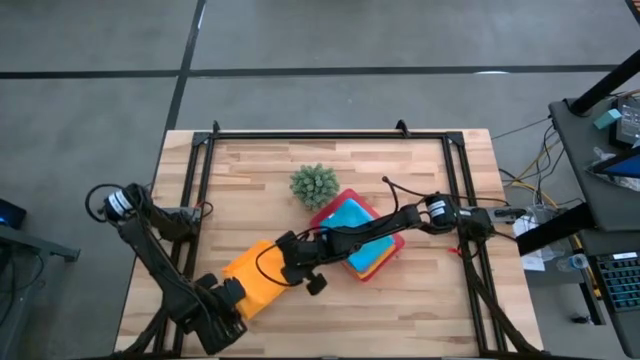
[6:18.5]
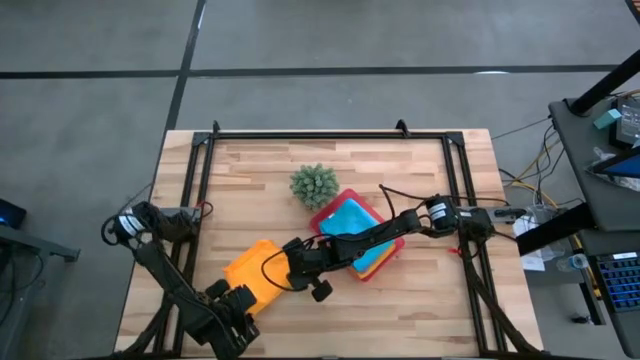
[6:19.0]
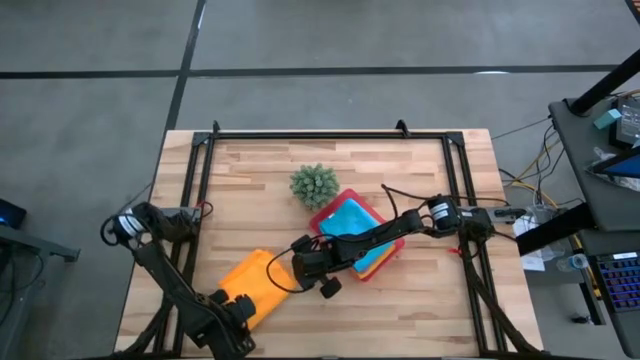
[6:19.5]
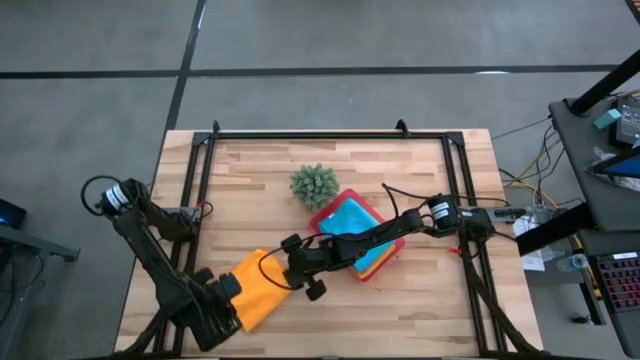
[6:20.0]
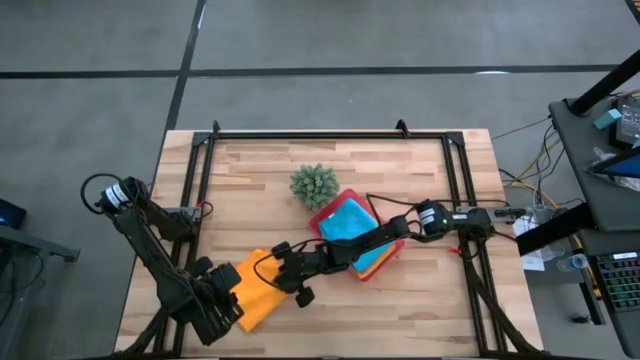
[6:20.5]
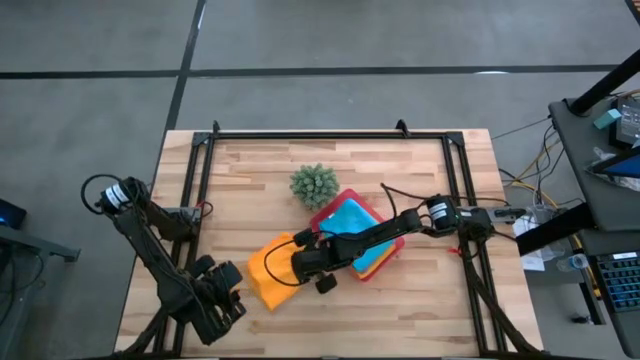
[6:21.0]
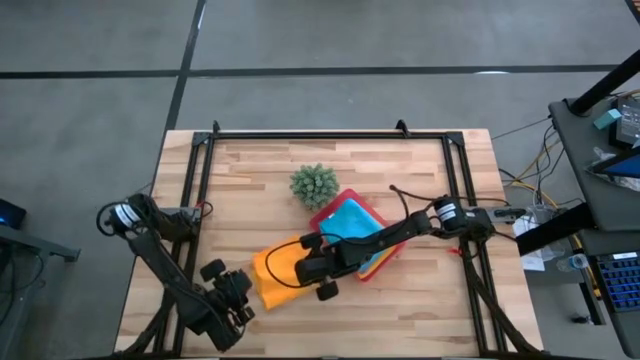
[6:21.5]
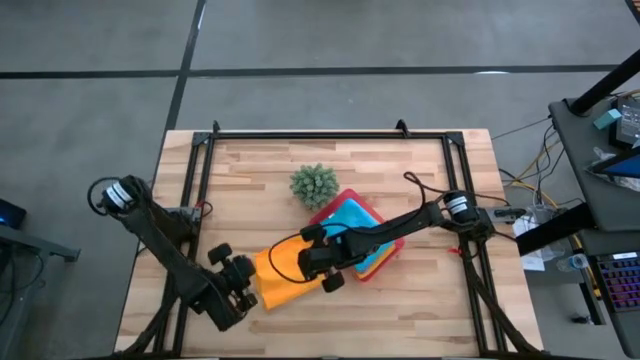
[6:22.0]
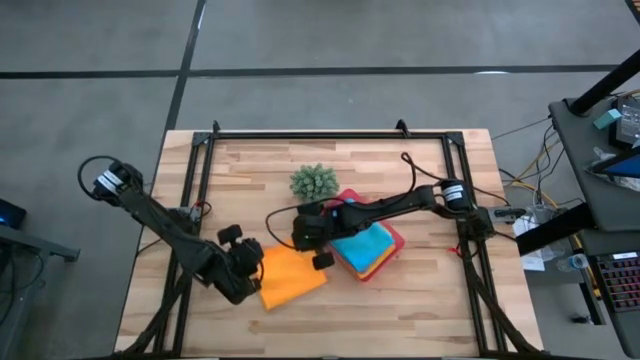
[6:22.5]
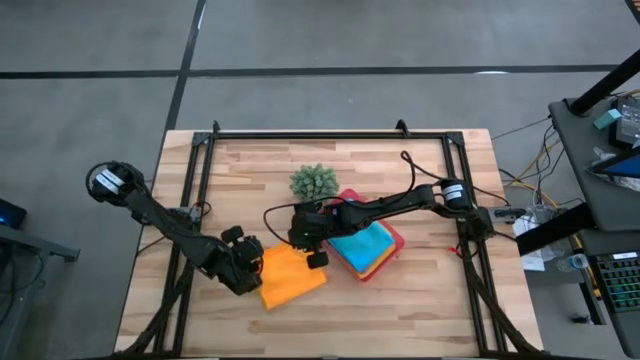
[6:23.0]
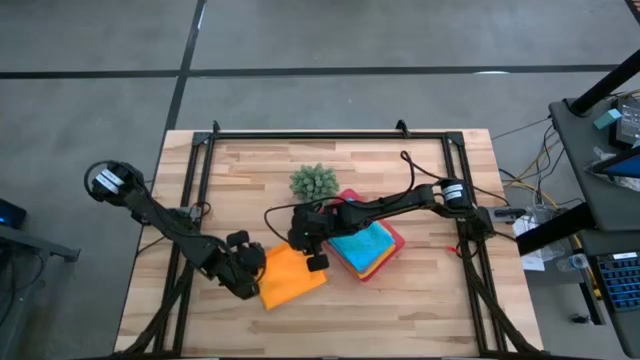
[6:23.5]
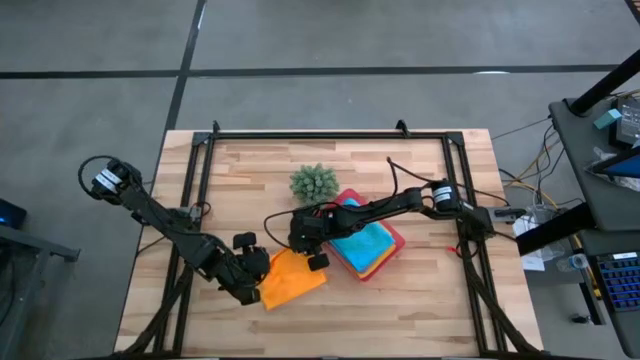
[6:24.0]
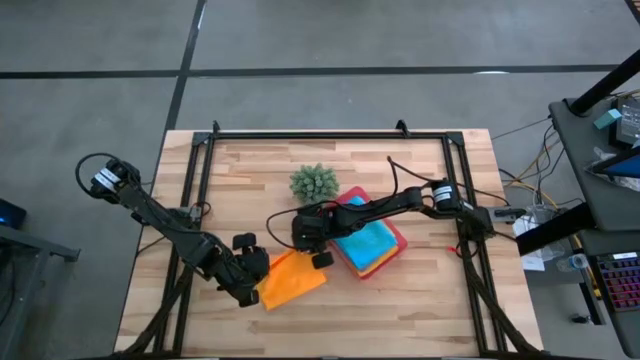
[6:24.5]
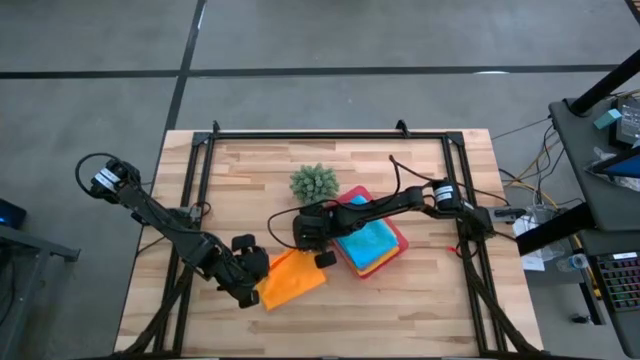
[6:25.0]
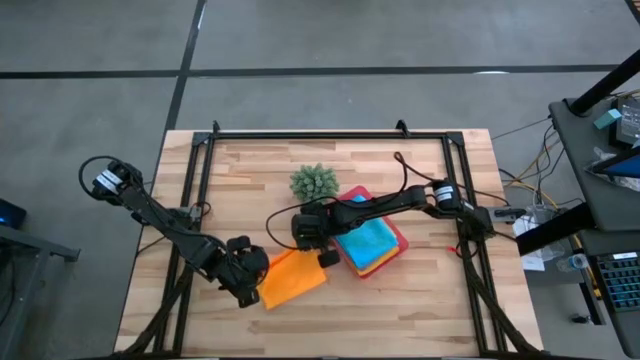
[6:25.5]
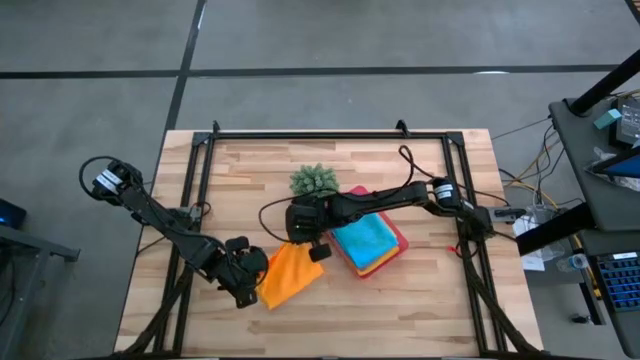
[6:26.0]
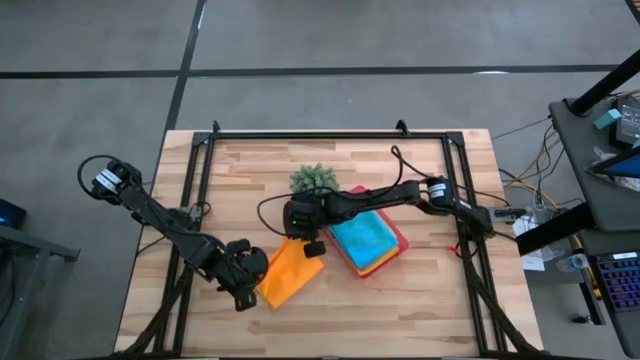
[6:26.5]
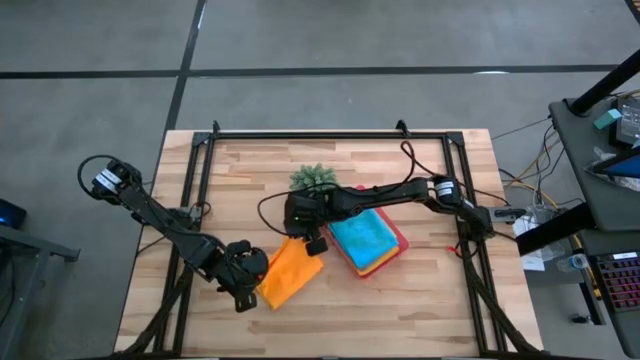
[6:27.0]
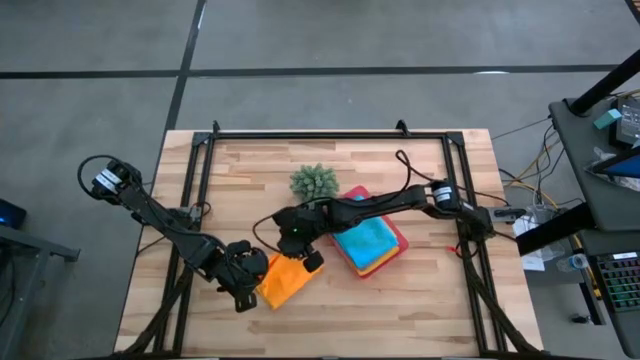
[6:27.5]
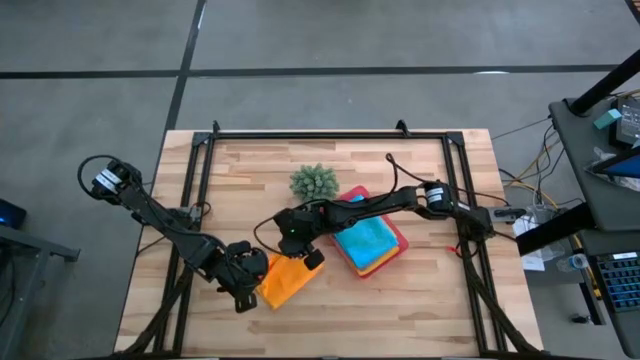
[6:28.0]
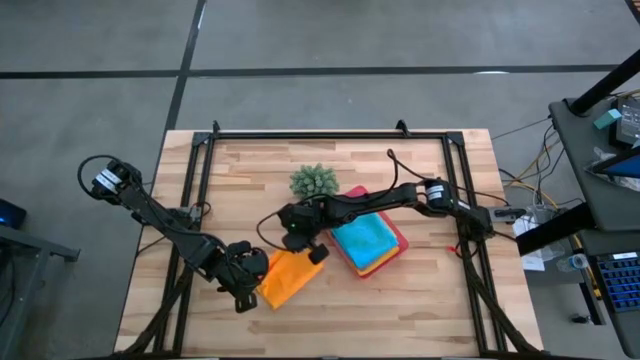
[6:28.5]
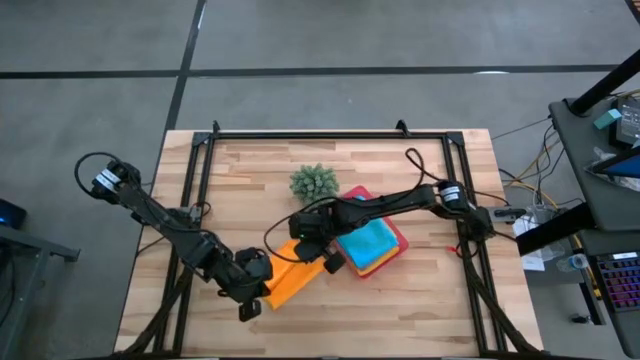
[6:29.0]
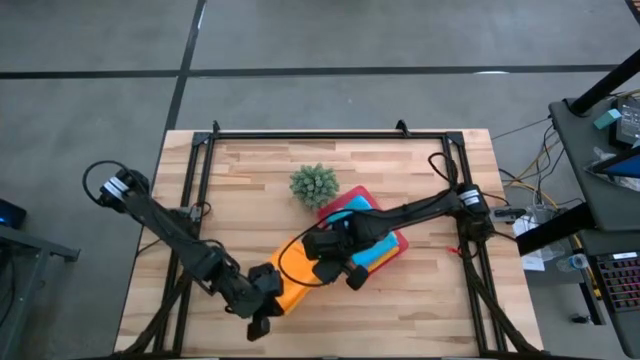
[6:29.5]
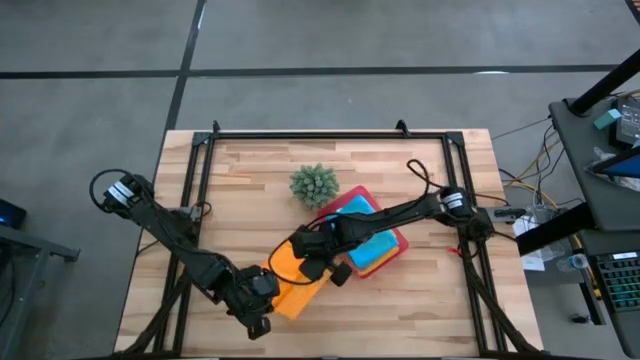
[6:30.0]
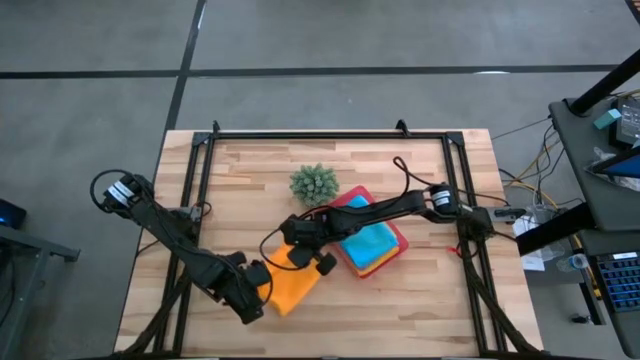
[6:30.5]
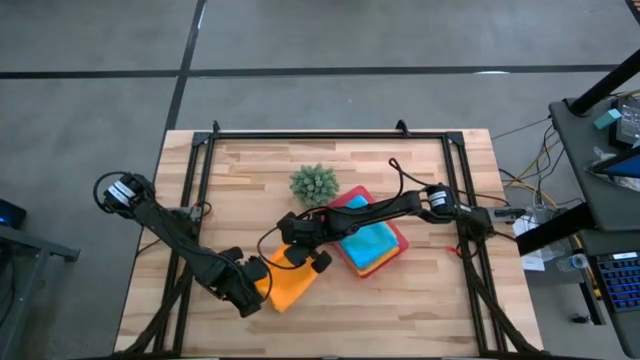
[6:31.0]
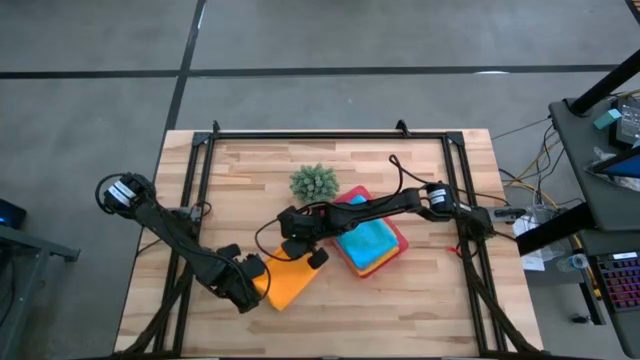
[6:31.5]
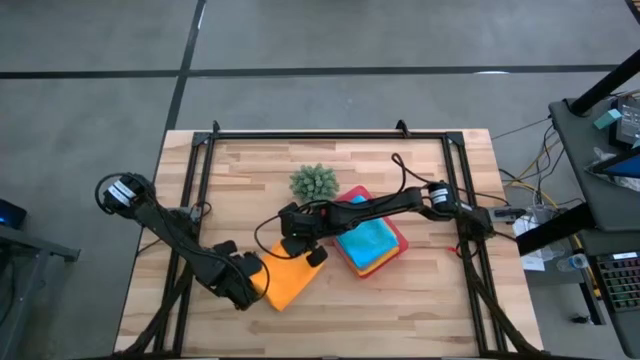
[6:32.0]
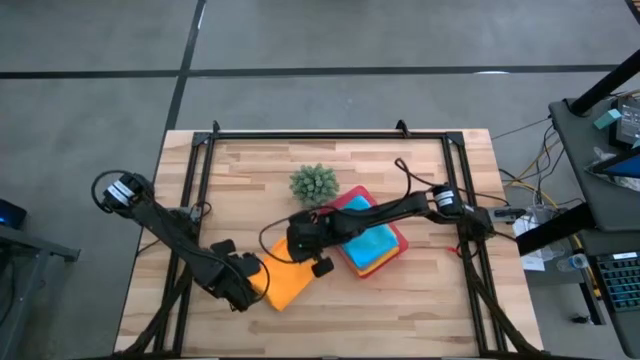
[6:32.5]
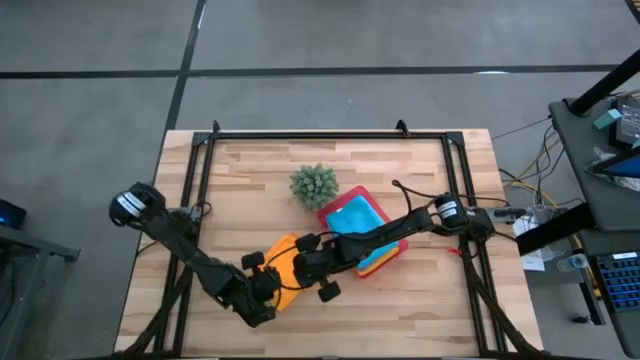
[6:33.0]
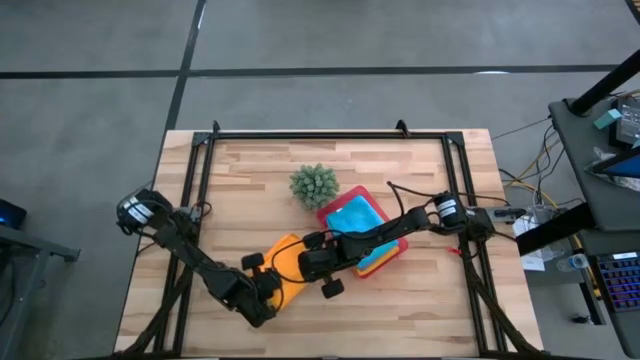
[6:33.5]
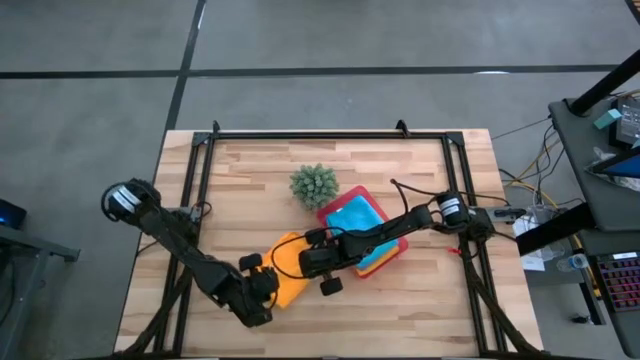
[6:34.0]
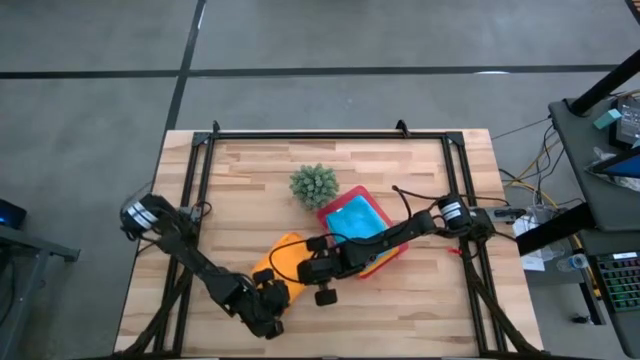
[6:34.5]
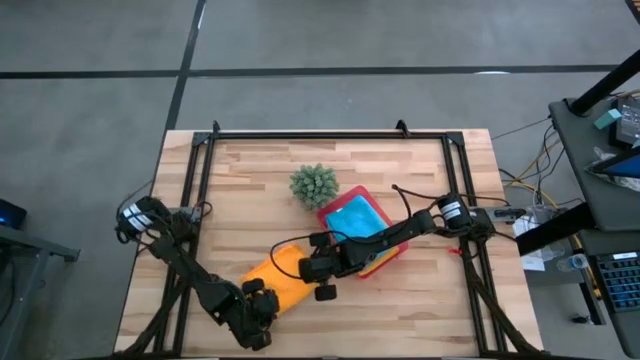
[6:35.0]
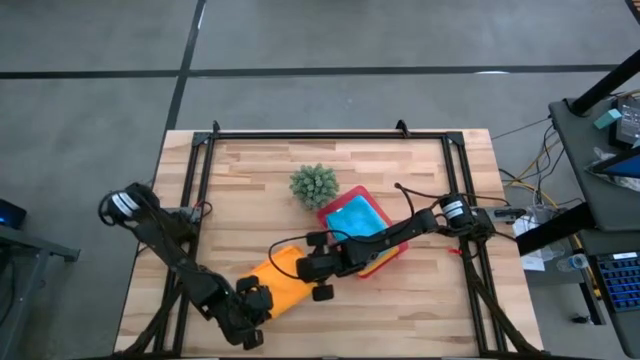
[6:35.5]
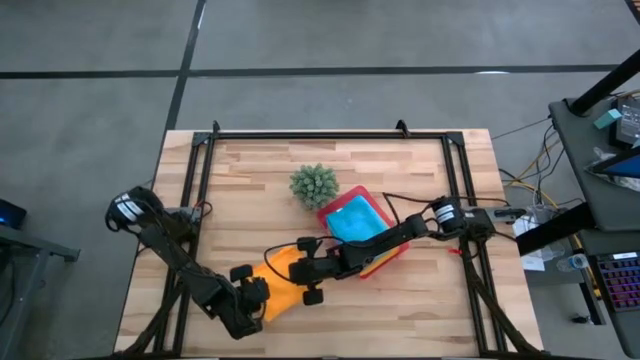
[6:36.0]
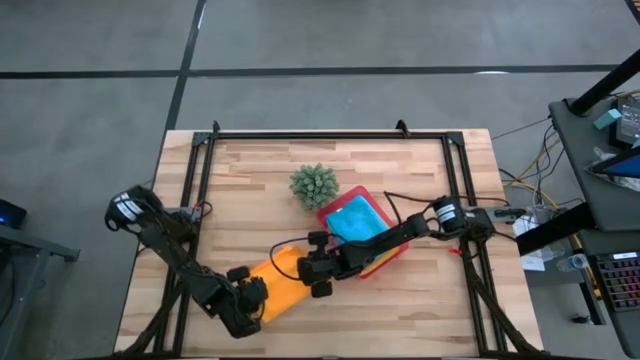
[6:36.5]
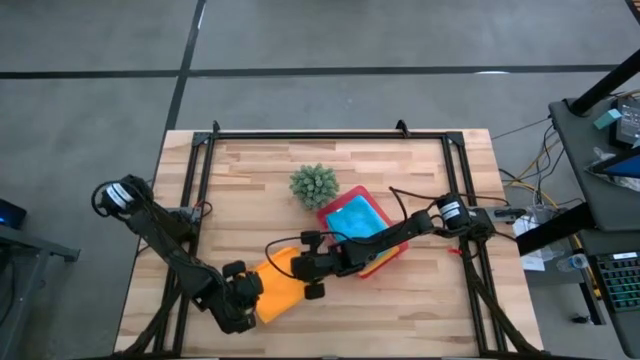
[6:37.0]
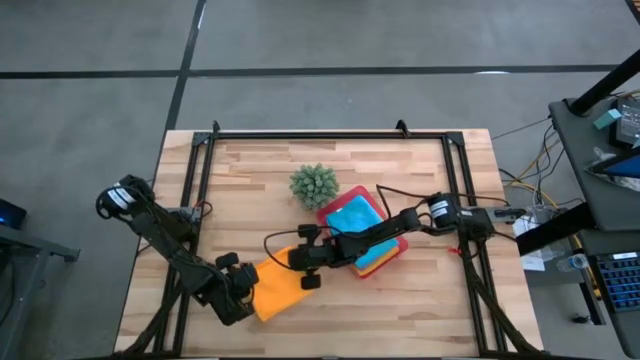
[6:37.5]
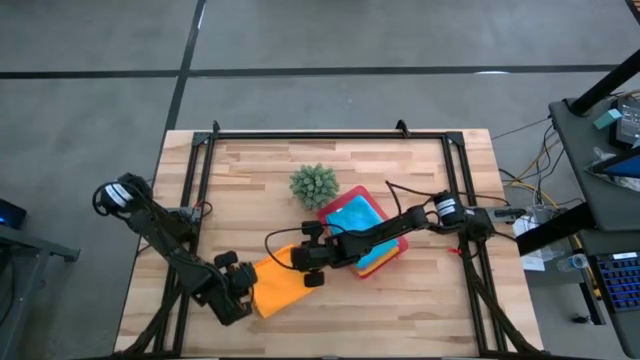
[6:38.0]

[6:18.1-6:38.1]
Task: Fold microfiber towels
Fold the orange microfiber cloth
